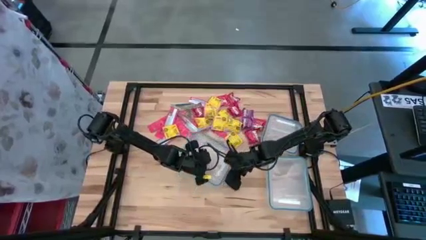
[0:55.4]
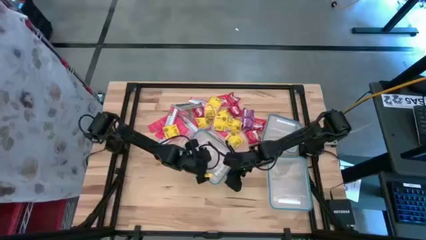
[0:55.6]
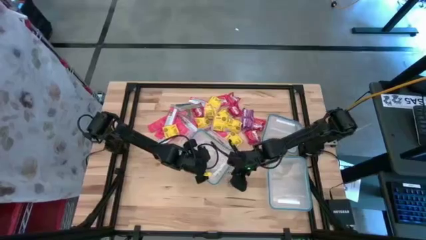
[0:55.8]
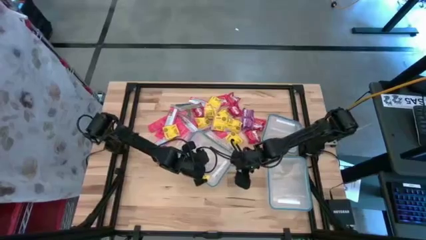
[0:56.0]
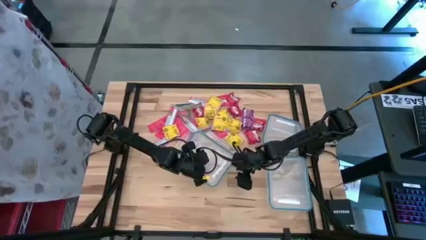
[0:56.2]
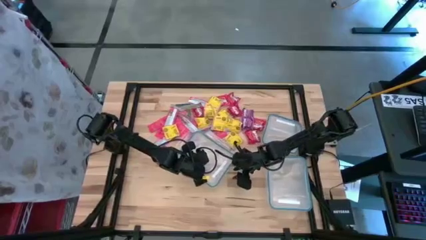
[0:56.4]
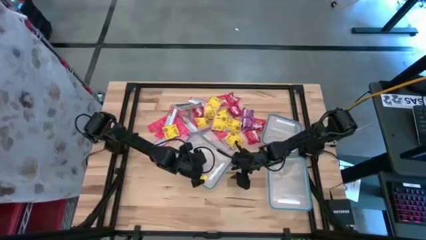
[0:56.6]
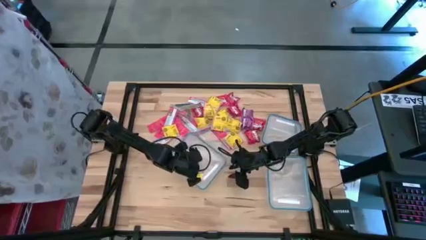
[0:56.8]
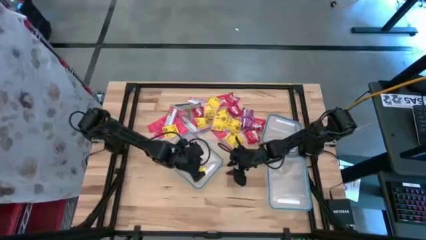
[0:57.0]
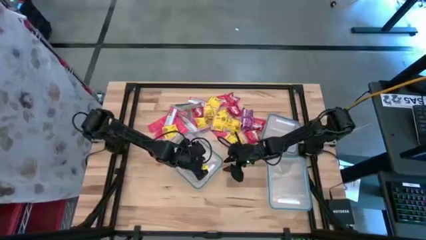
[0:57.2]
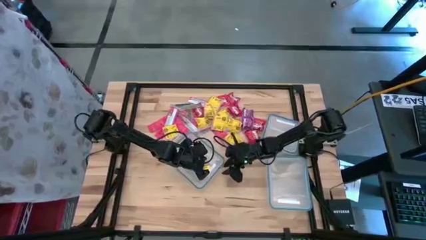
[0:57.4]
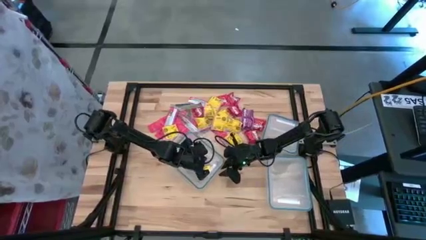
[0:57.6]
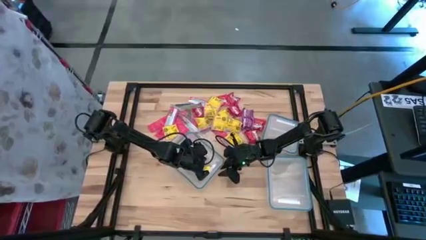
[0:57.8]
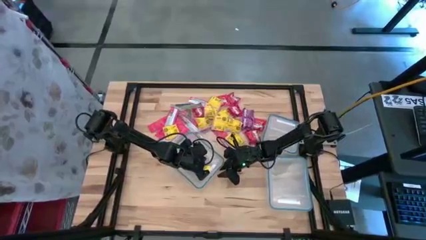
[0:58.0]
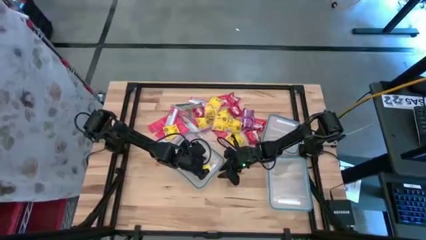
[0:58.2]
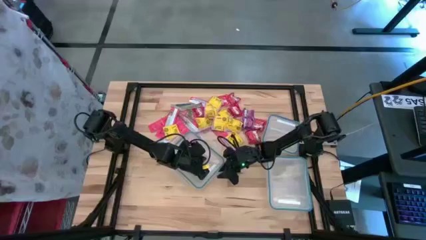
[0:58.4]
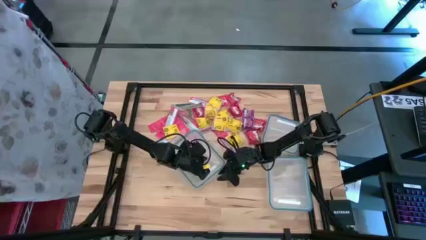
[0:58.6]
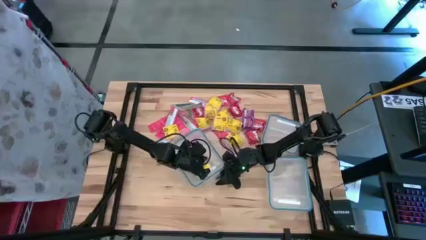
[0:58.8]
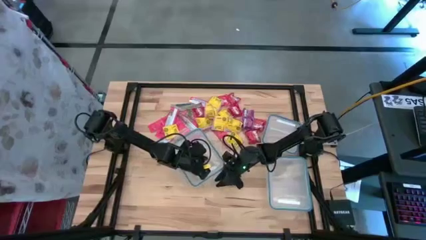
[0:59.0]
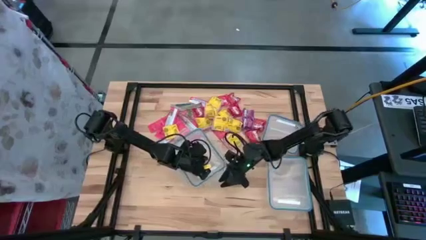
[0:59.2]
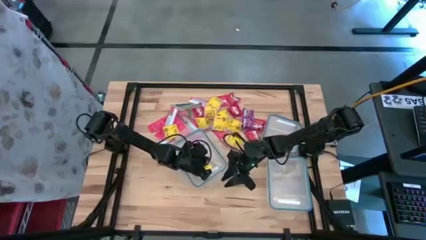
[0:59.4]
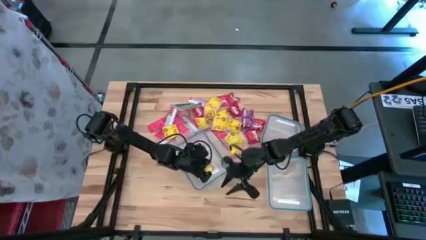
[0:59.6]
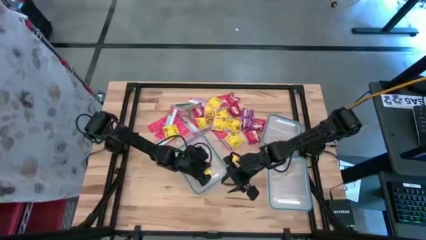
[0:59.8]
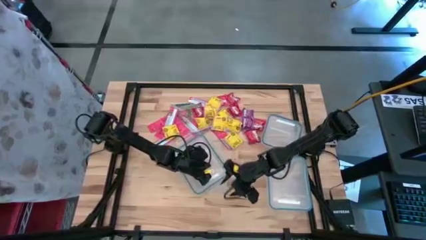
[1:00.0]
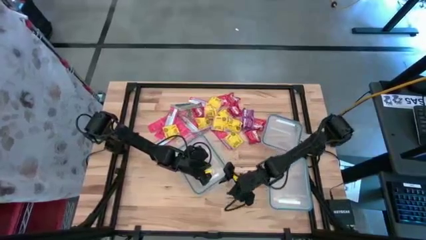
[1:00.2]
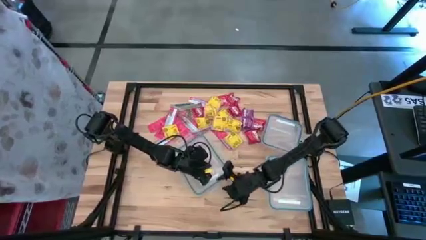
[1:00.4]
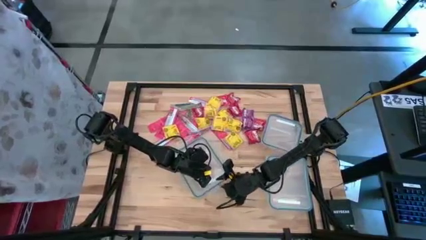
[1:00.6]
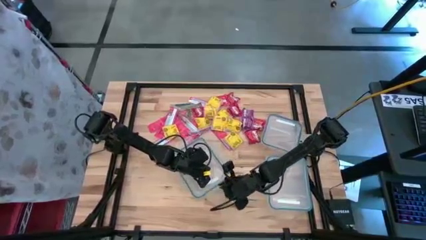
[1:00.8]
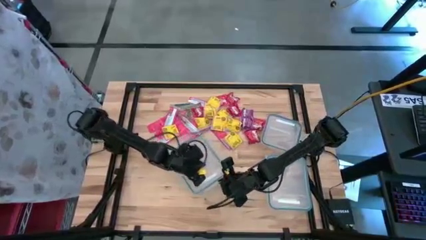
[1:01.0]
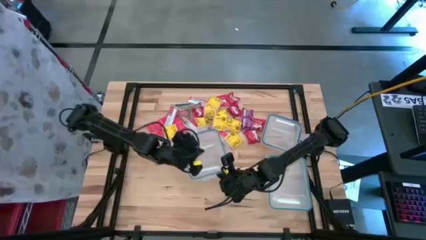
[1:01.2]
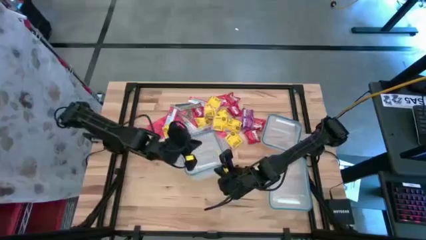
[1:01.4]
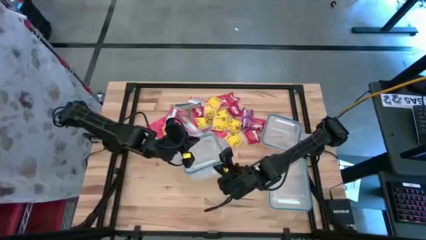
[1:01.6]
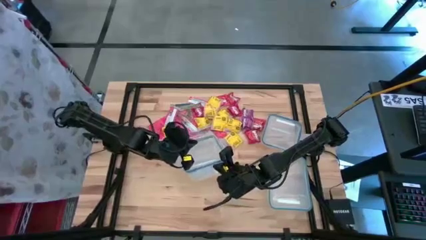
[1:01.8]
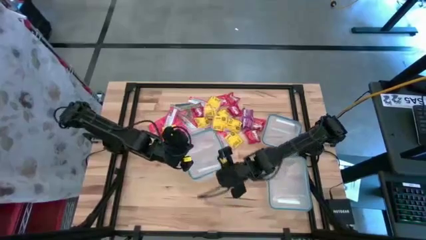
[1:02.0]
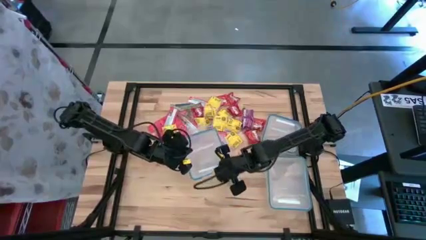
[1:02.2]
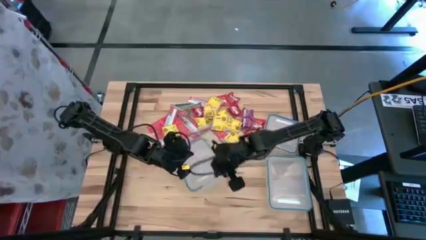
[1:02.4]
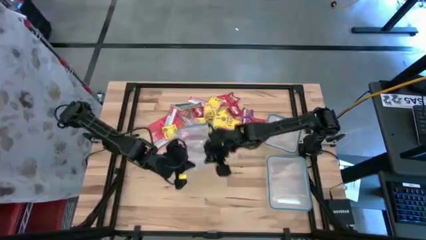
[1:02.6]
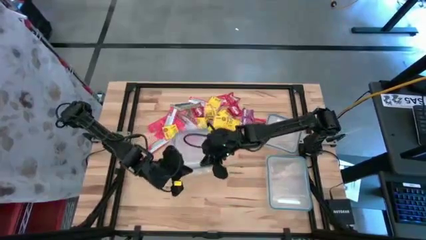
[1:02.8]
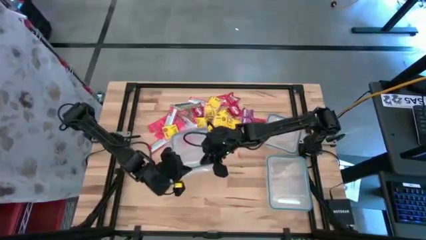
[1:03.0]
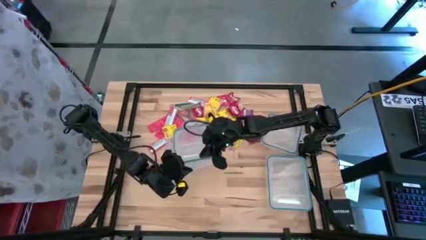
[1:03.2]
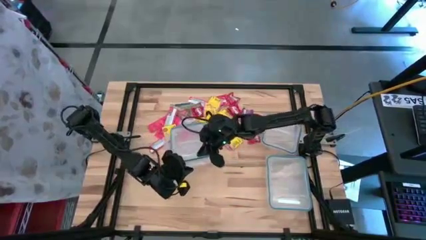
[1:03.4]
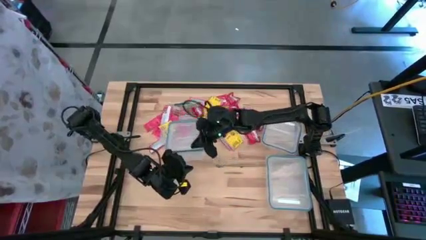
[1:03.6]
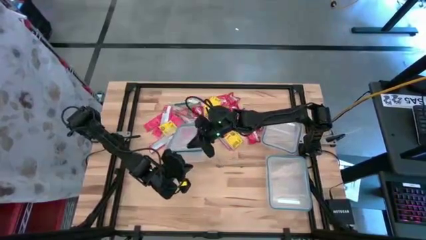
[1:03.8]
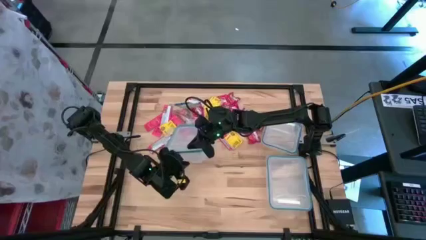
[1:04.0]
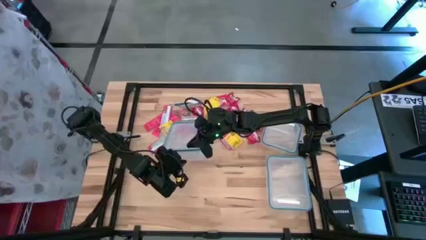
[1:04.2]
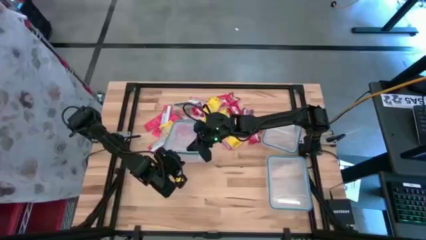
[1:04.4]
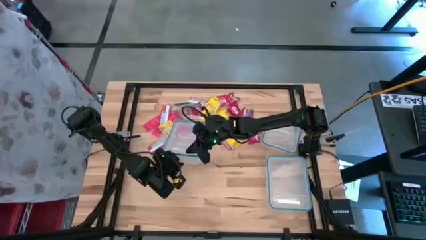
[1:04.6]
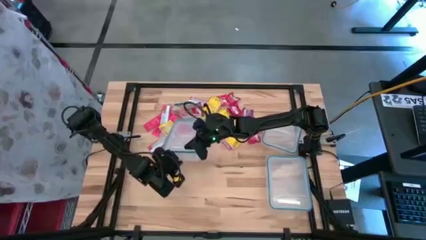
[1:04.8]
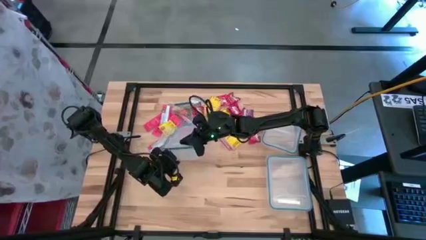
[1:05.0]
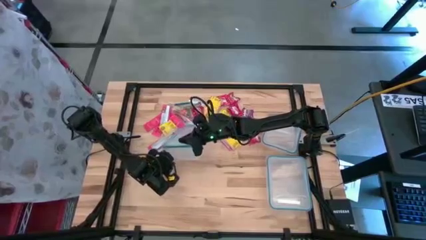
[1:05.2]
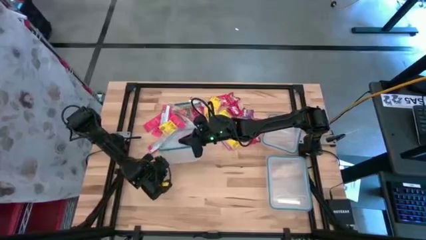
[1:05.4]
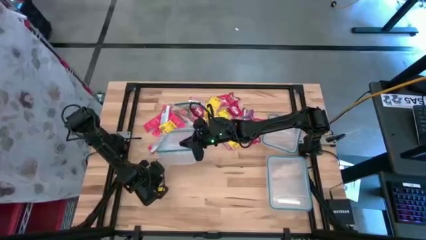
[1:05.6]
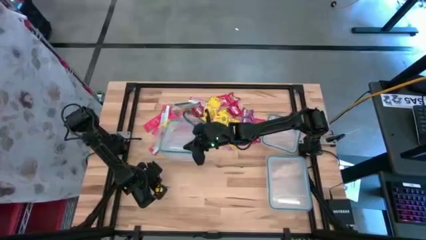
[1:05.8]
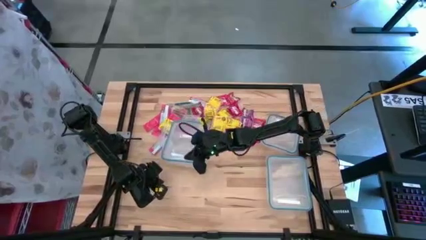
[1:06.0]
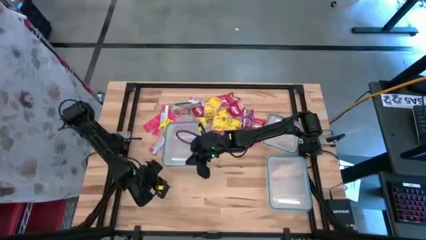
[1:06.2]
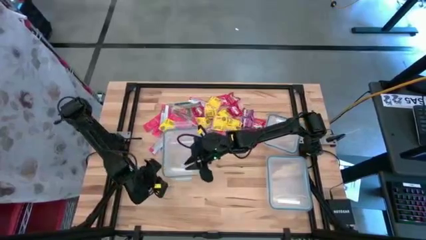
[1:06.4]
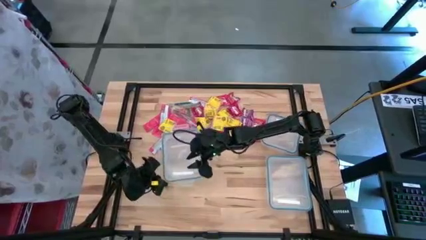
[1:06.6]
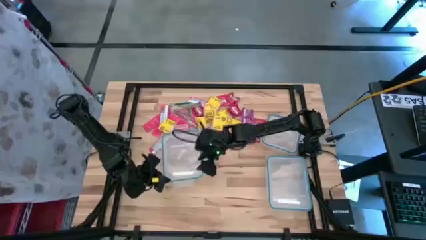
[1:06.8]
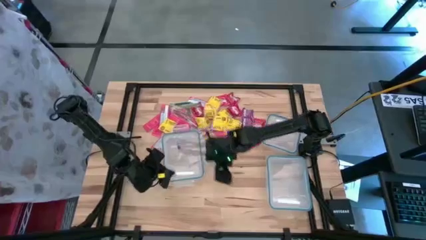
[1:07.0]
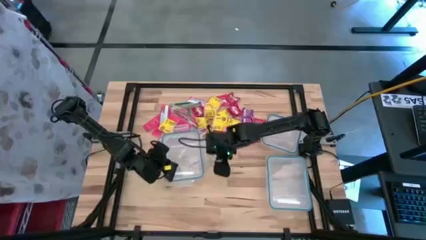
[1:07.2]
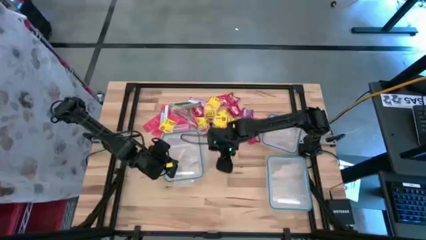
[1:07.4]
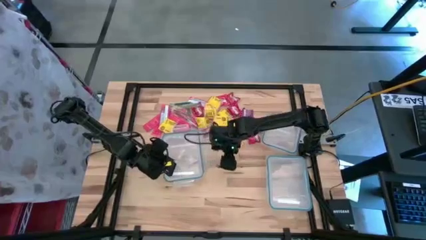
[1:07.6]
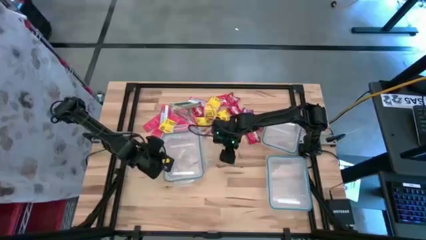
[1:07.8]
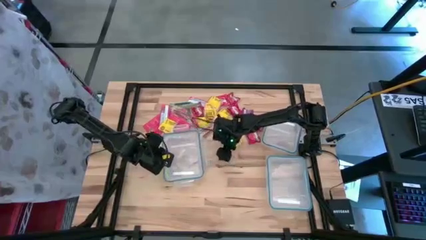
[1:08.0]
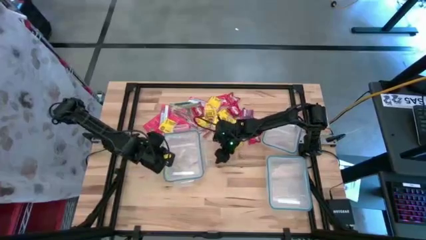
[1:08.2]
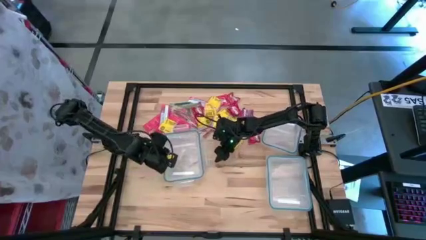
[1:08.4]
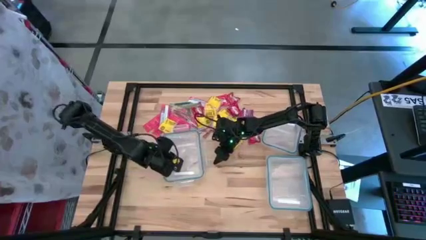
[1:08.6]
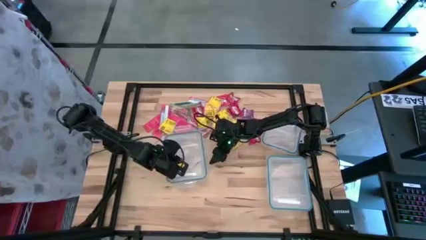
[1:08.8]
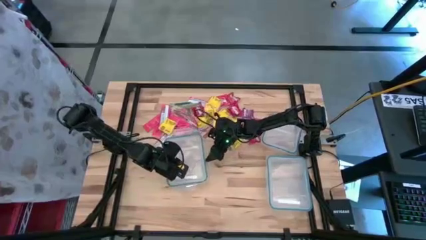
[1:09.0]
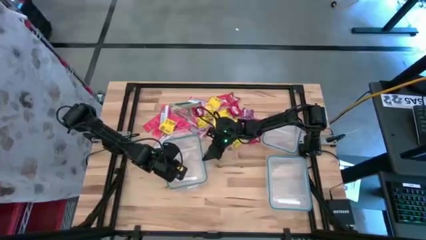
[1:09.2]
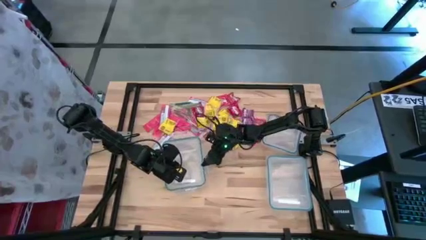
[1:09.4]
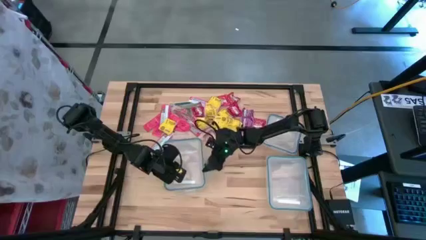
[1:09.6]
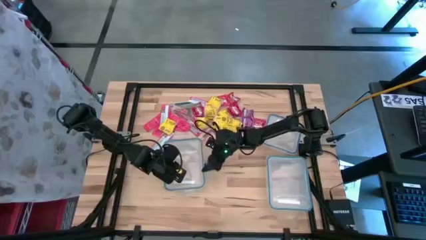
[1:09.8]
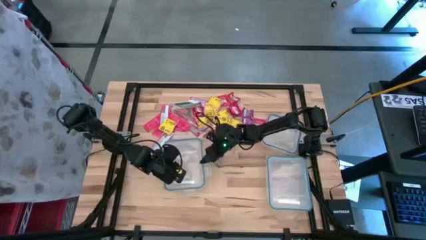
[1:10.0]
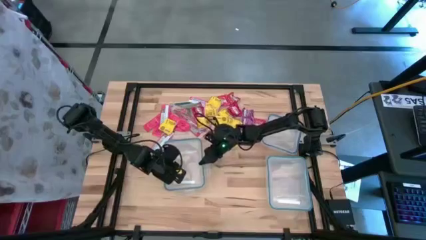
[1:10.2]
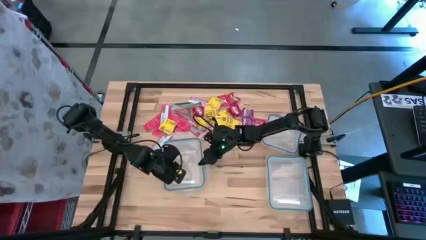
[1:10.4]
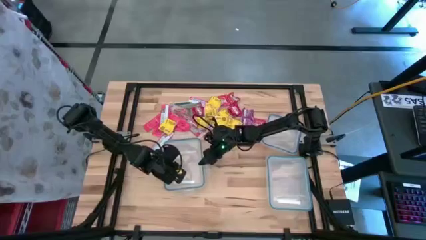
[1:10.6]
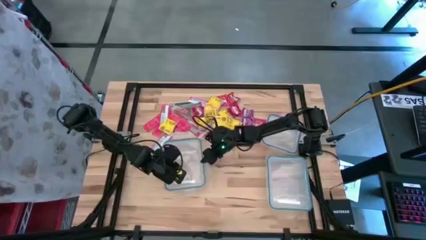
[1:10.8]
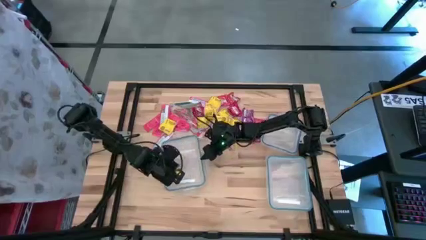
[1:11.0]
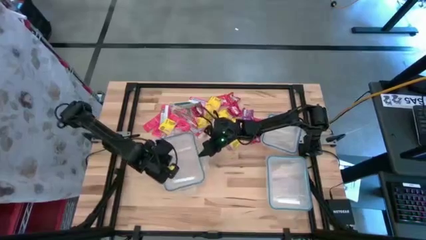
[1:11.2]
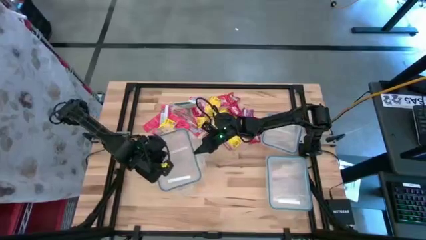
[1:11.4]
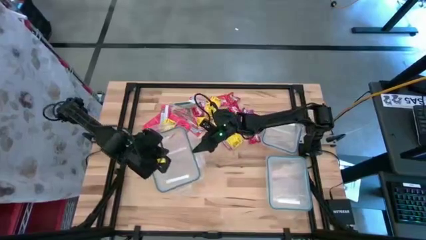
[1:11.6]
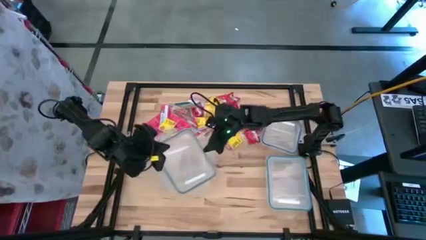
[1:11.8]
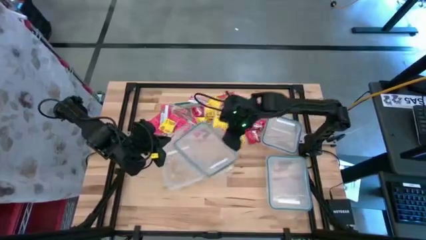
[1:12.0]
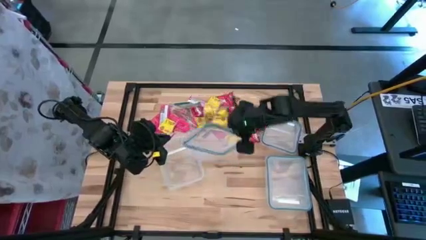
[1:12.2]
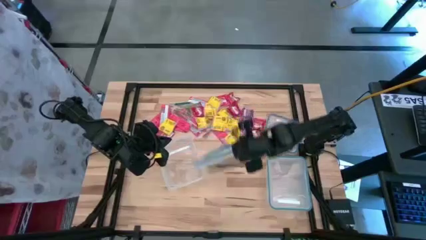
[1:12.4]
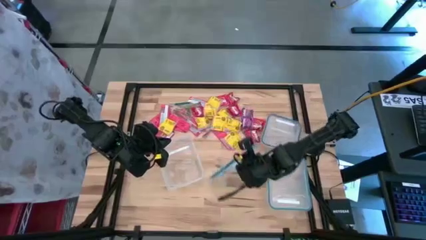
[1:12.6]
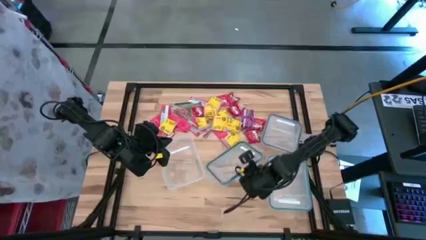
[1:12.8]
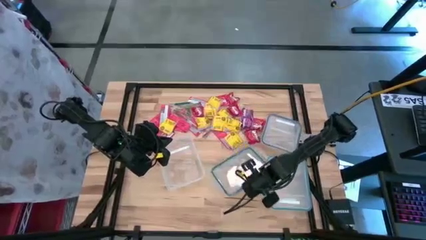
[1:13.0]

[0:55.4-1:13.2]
Task: Sort candy
Open the rectangular transparent bin
